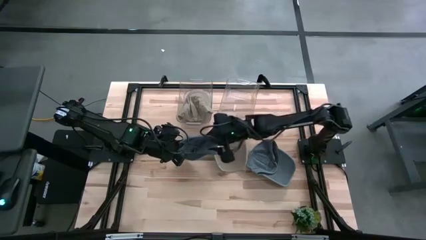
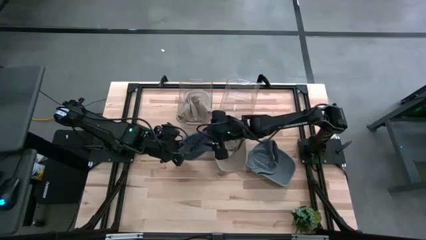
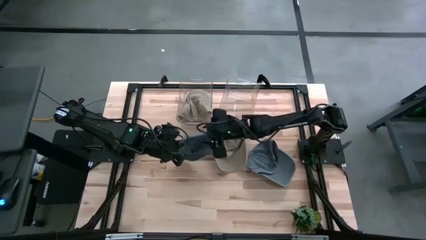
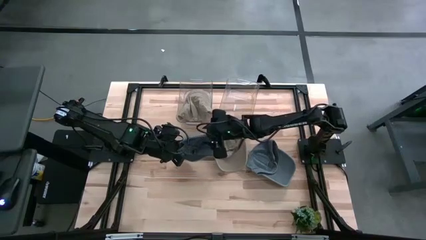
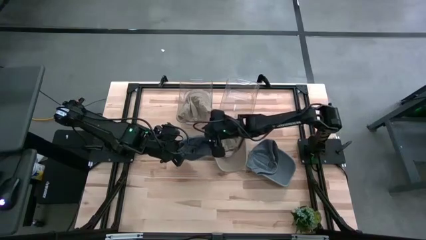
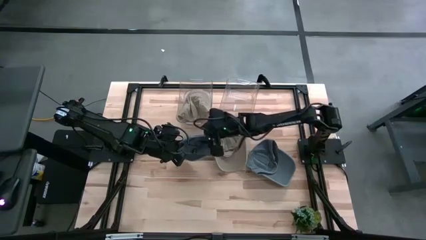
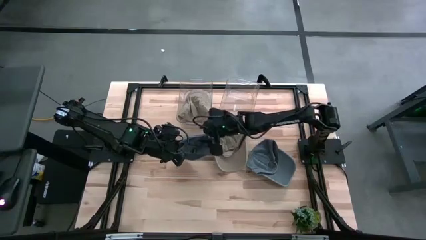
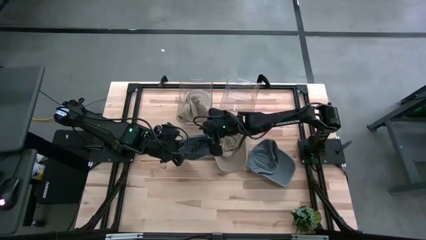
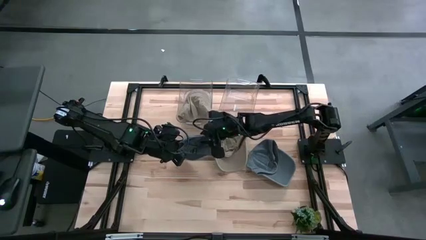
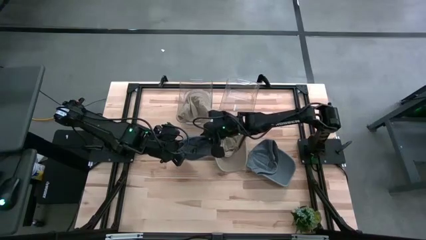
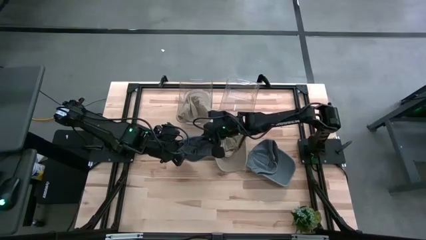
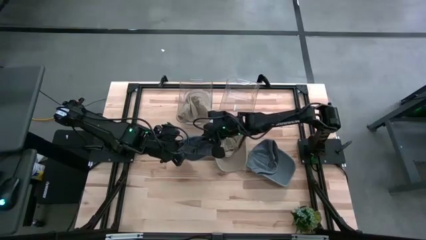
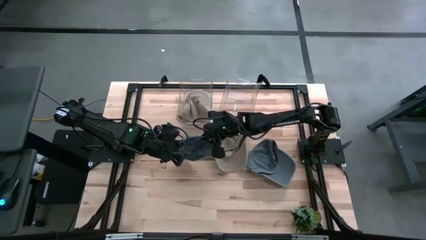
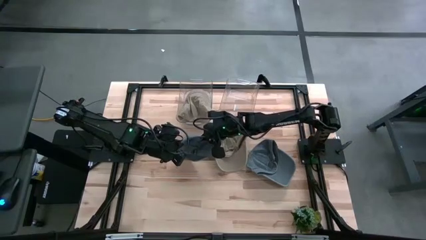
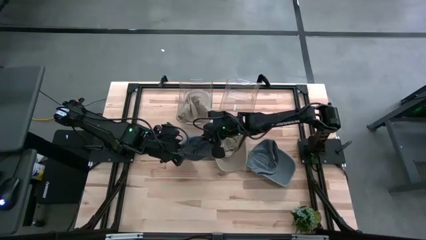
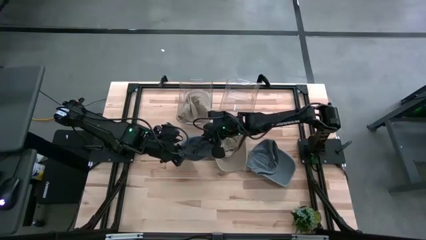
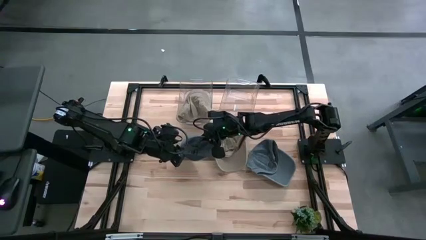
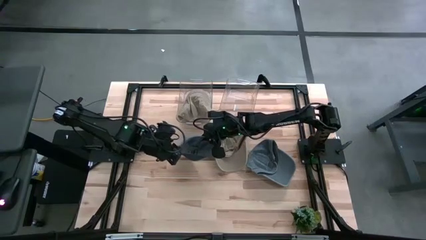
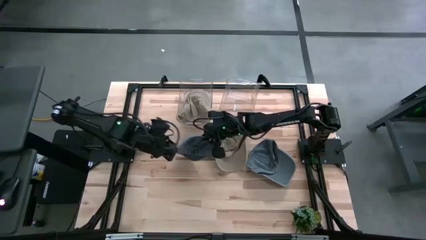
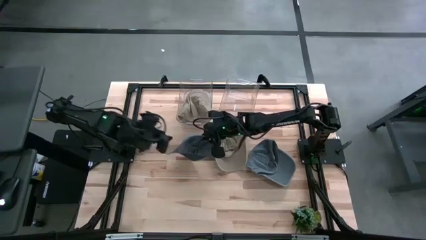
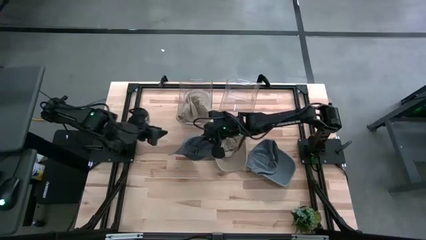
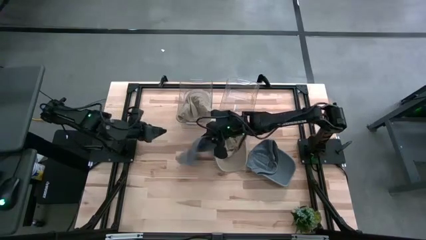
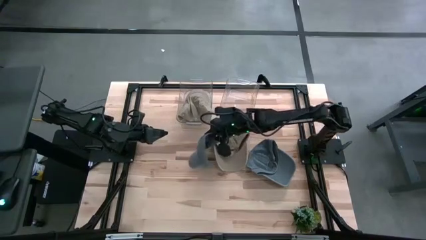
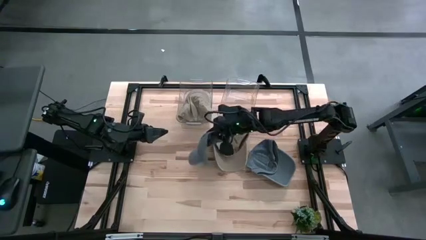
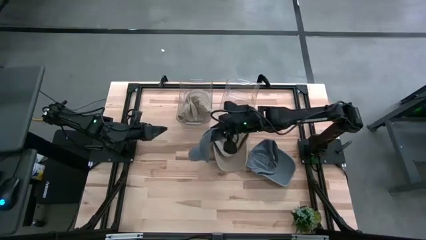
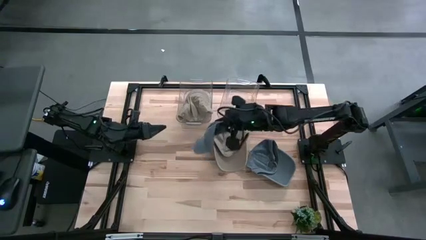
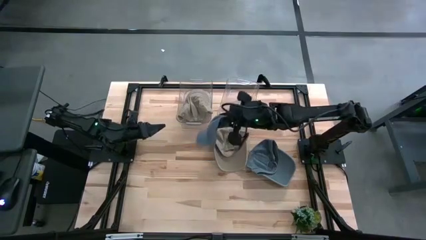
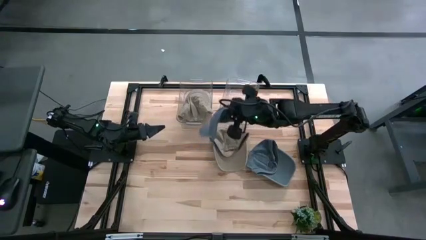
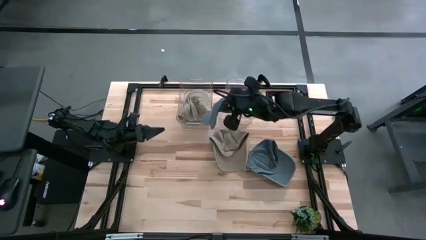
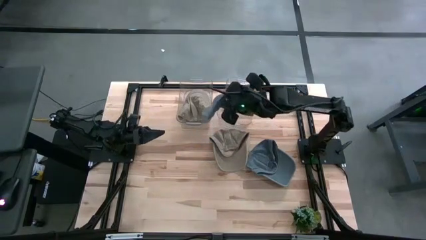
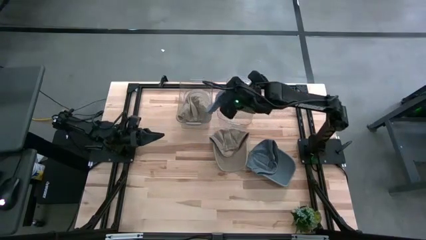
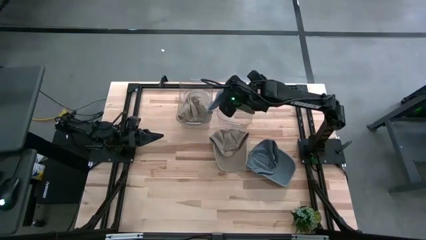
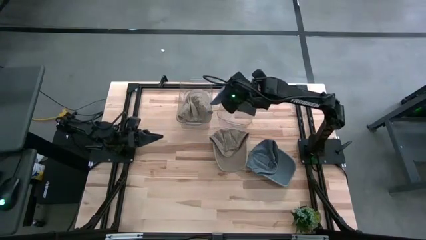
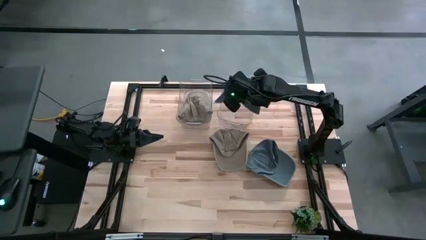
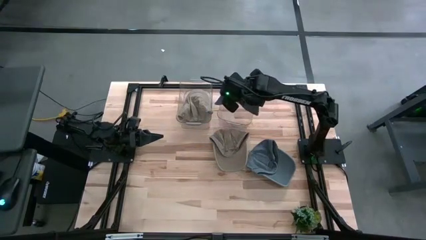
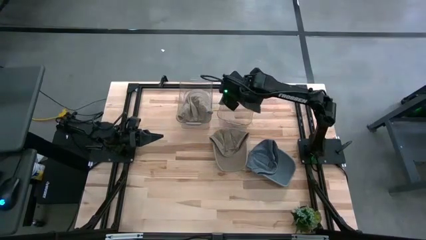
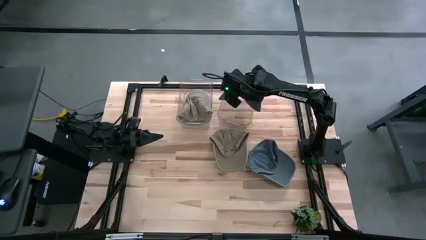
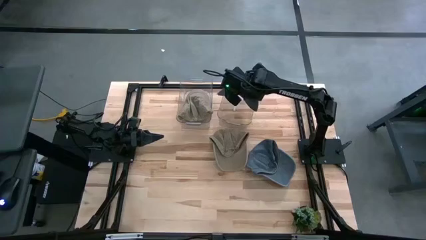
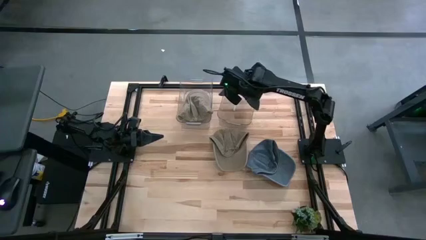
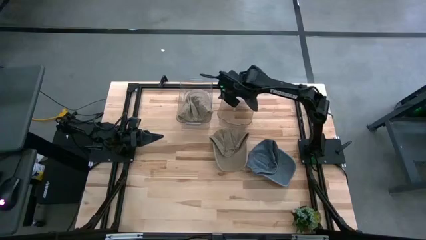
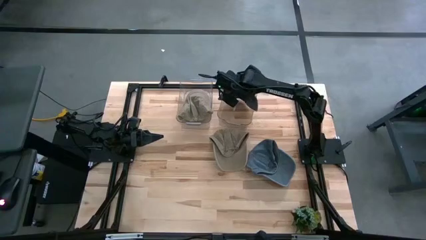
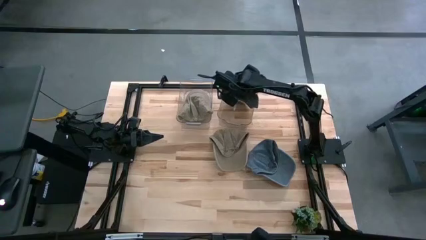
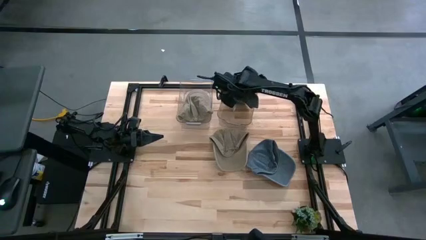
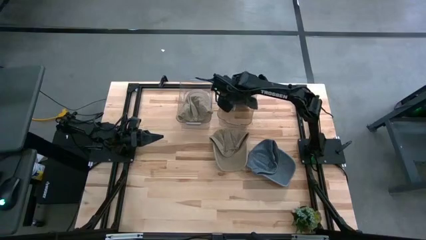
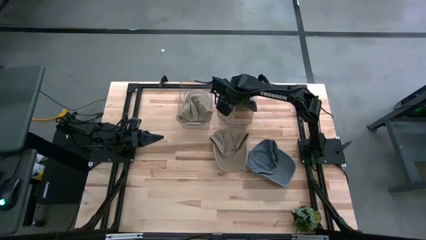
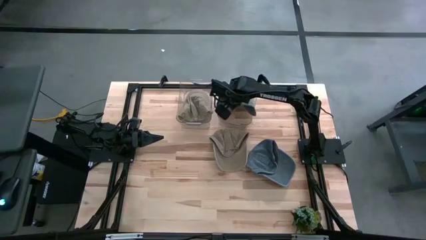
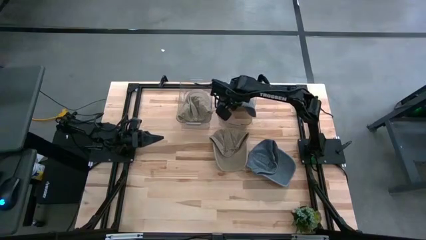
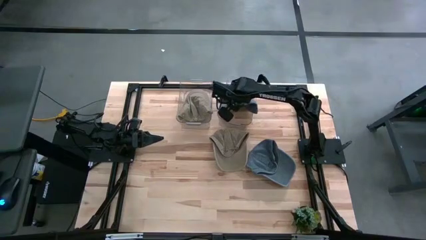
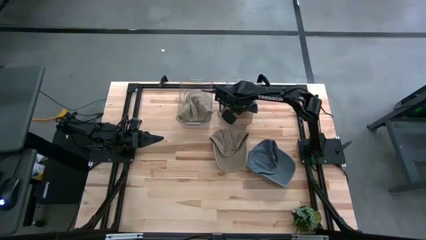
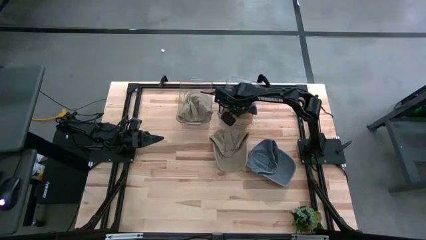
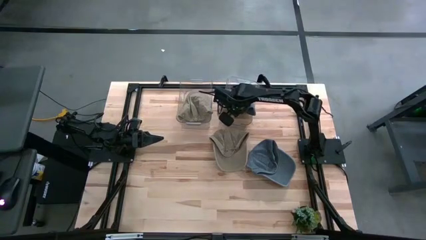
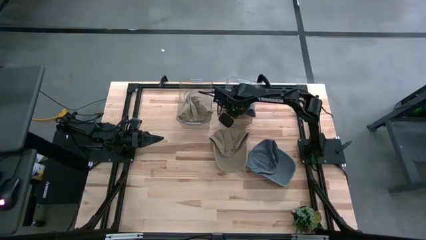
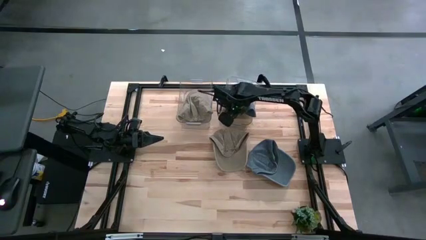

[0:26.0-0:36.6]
Task: Pick & Place hat
Put the left blue cap into the right transparent bin
